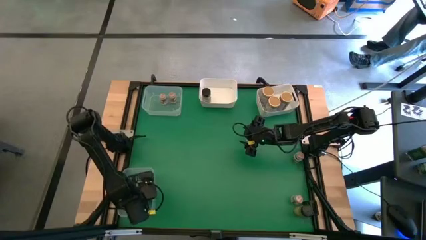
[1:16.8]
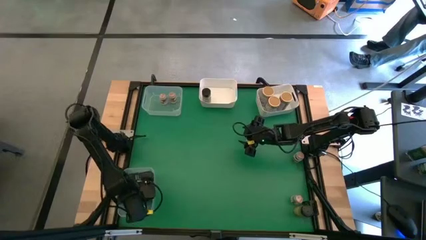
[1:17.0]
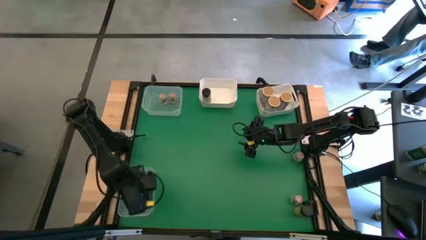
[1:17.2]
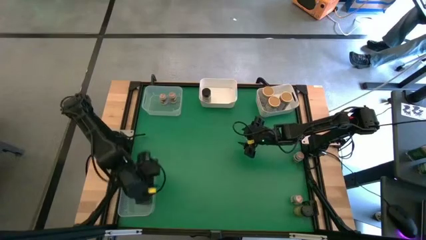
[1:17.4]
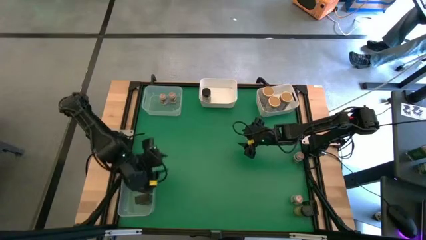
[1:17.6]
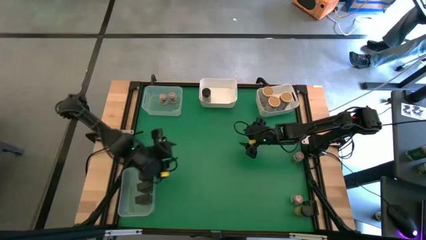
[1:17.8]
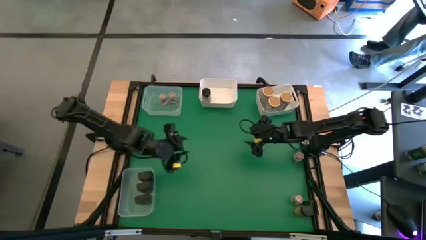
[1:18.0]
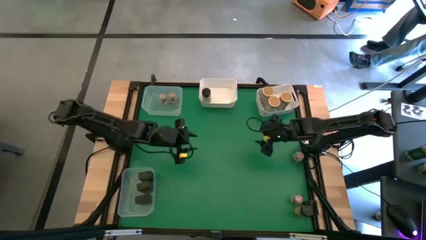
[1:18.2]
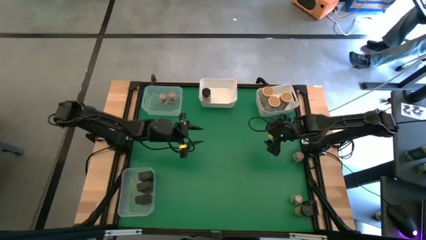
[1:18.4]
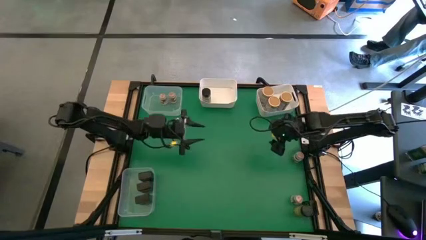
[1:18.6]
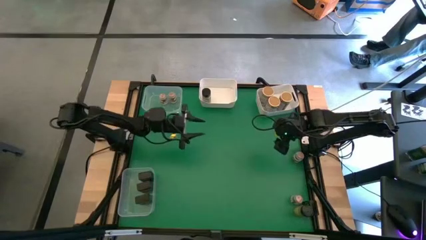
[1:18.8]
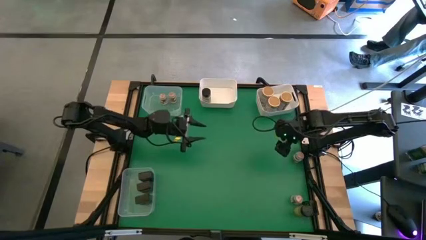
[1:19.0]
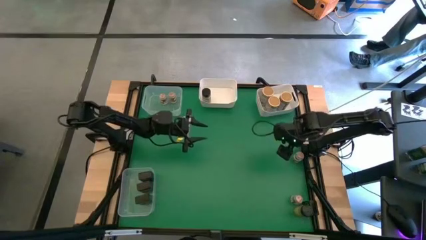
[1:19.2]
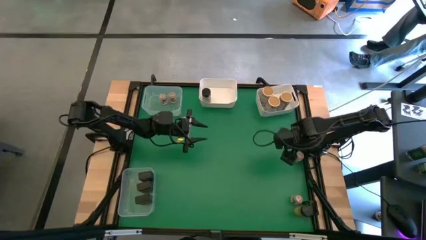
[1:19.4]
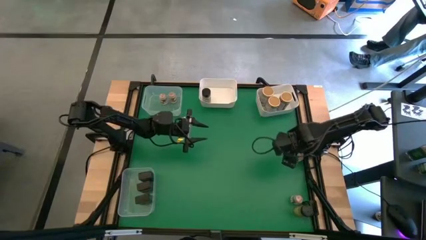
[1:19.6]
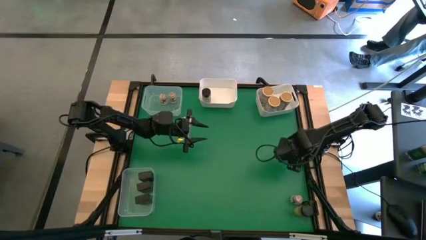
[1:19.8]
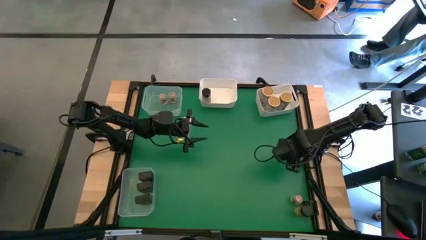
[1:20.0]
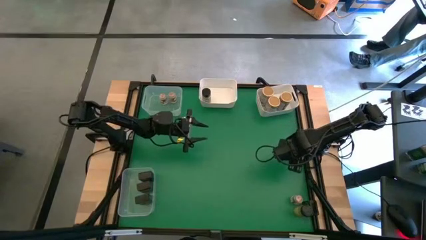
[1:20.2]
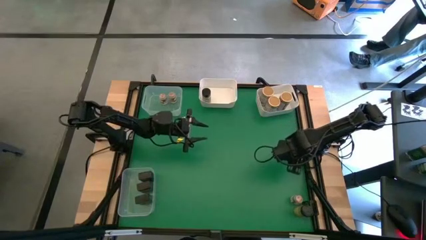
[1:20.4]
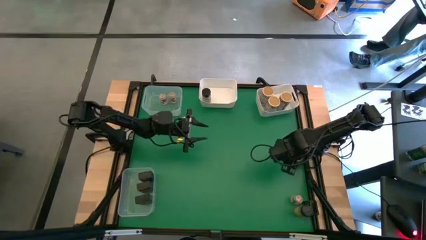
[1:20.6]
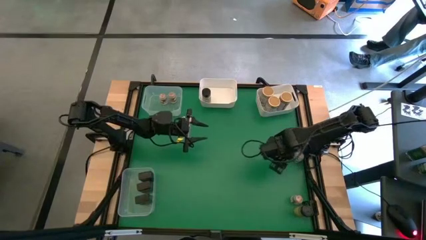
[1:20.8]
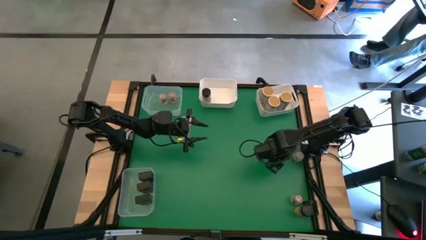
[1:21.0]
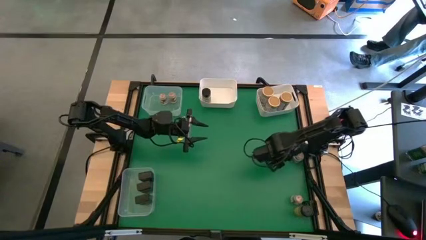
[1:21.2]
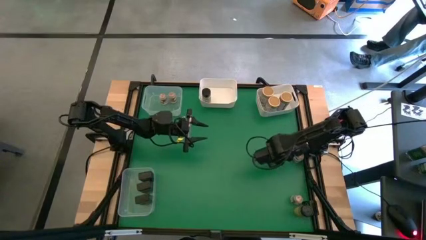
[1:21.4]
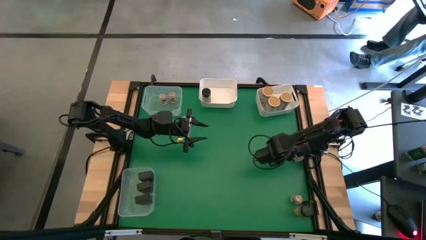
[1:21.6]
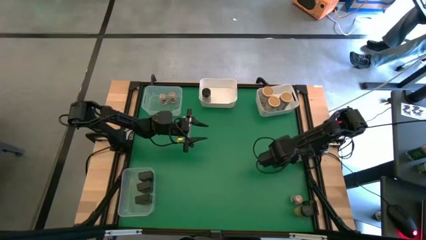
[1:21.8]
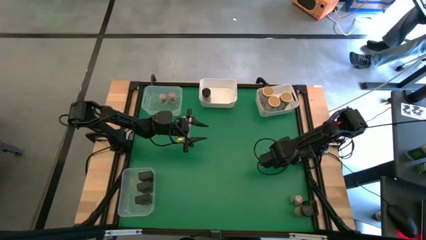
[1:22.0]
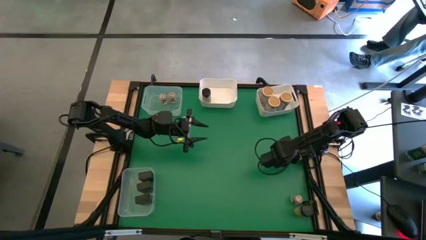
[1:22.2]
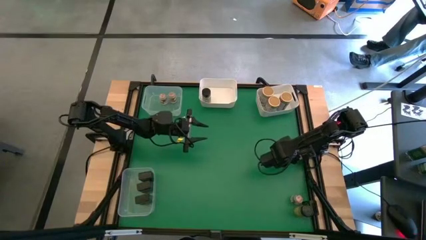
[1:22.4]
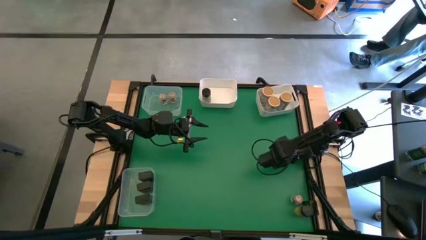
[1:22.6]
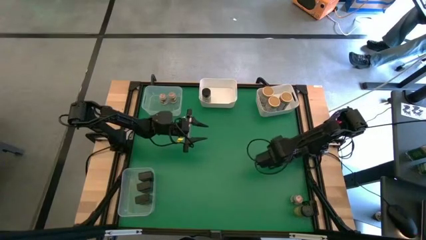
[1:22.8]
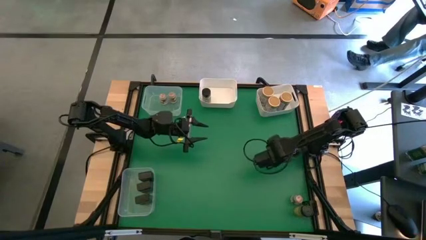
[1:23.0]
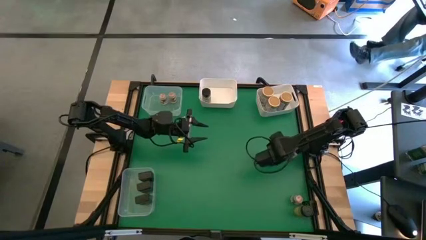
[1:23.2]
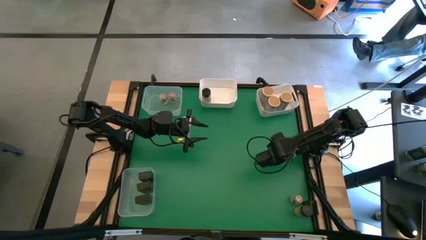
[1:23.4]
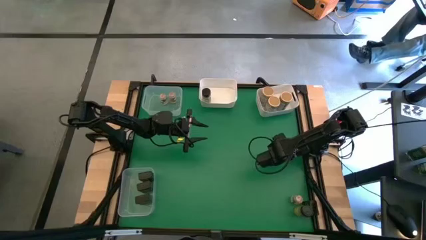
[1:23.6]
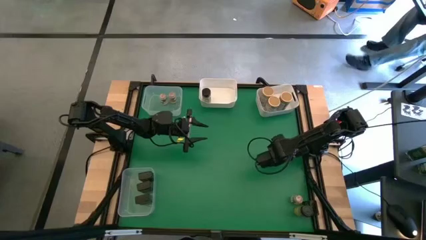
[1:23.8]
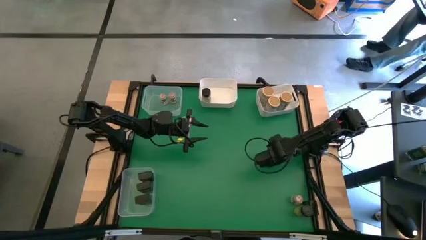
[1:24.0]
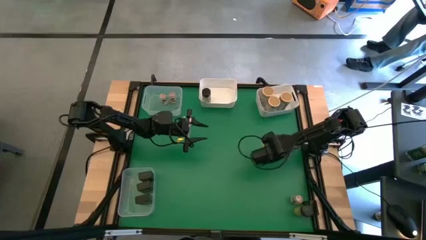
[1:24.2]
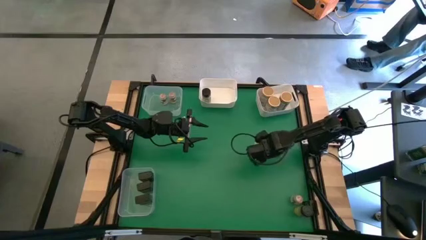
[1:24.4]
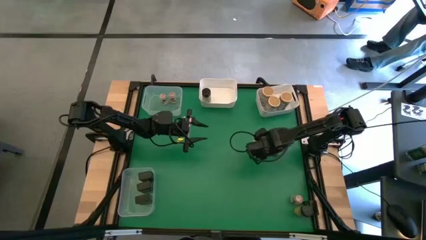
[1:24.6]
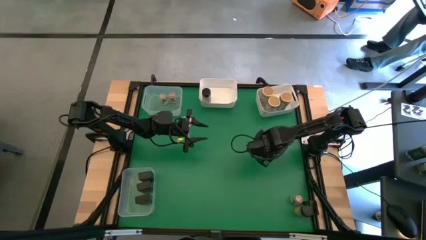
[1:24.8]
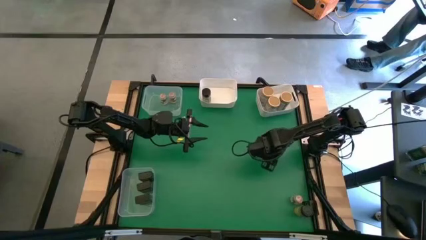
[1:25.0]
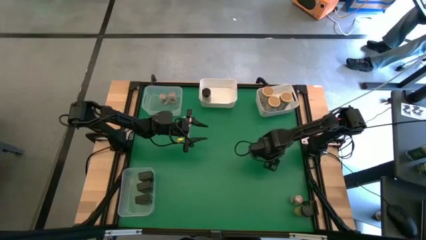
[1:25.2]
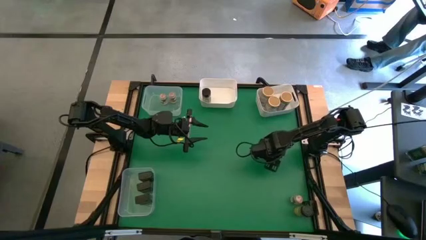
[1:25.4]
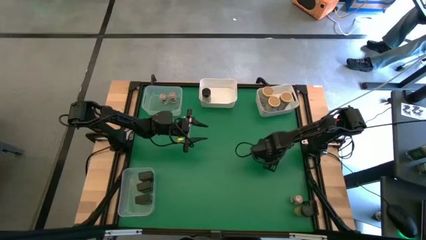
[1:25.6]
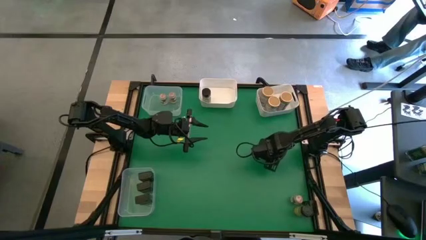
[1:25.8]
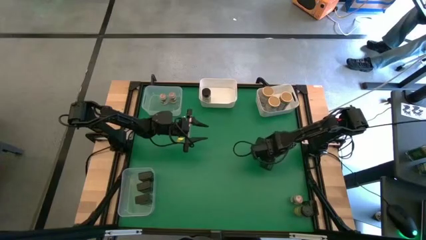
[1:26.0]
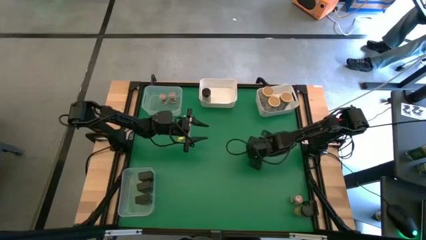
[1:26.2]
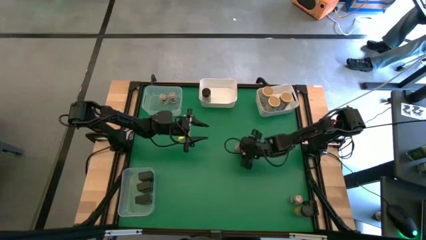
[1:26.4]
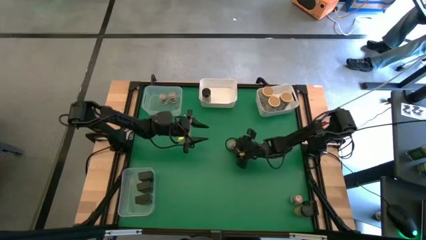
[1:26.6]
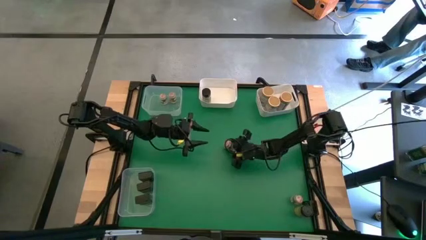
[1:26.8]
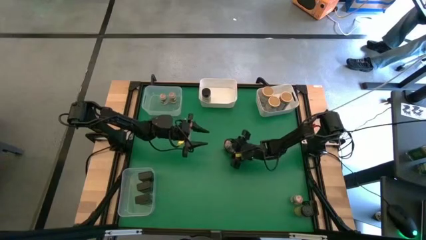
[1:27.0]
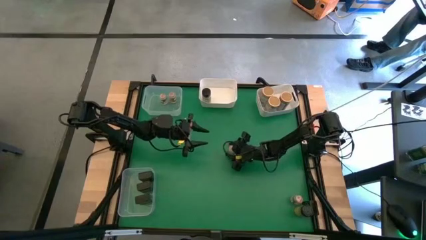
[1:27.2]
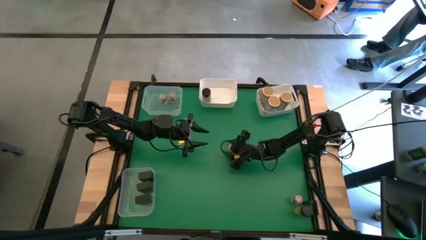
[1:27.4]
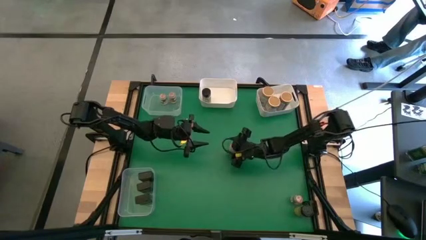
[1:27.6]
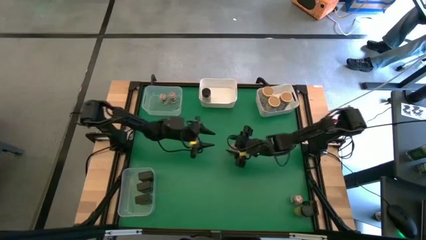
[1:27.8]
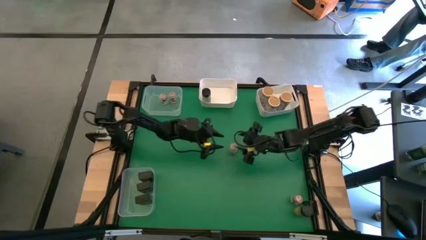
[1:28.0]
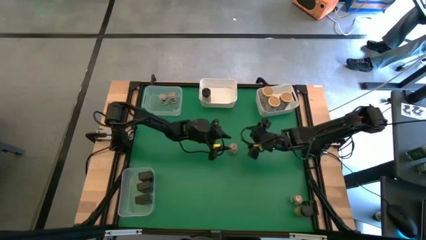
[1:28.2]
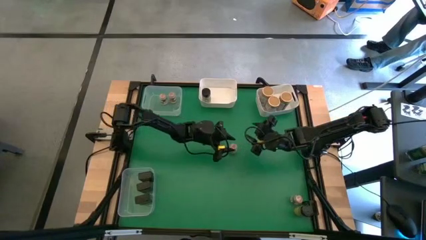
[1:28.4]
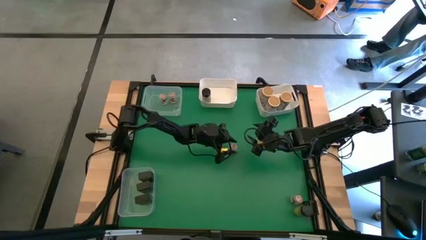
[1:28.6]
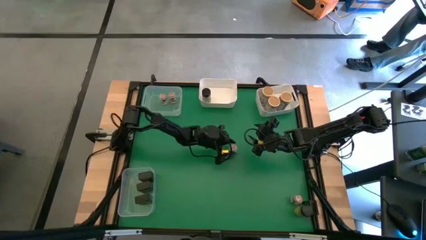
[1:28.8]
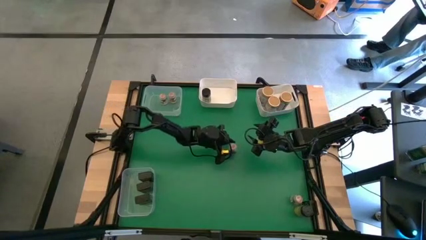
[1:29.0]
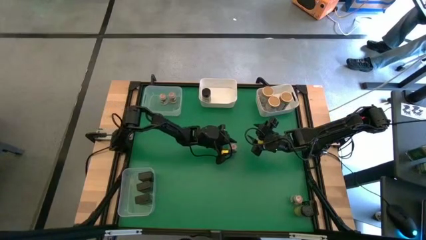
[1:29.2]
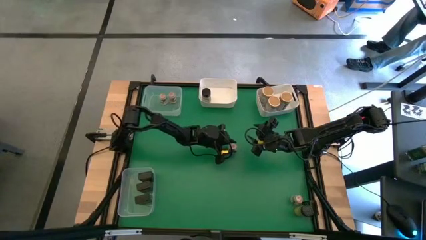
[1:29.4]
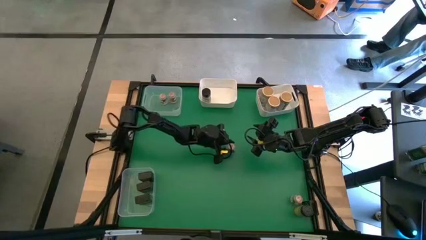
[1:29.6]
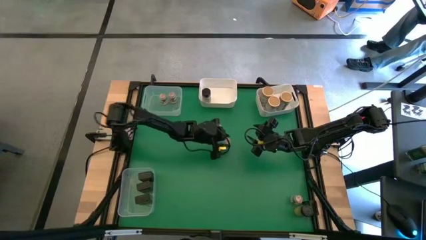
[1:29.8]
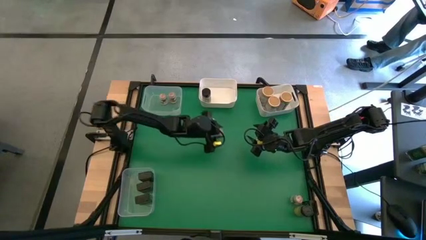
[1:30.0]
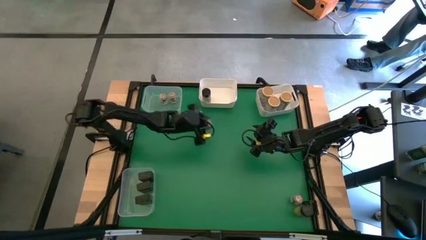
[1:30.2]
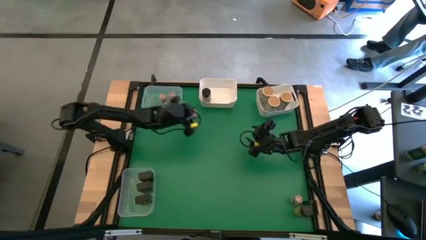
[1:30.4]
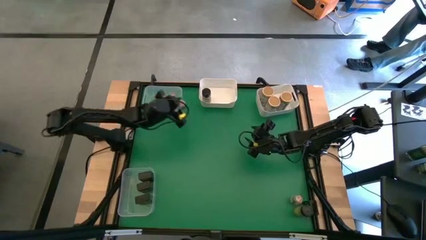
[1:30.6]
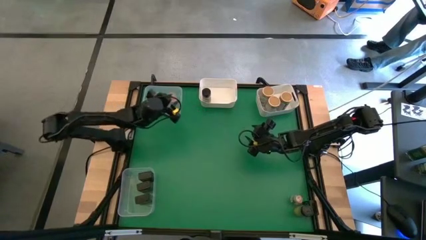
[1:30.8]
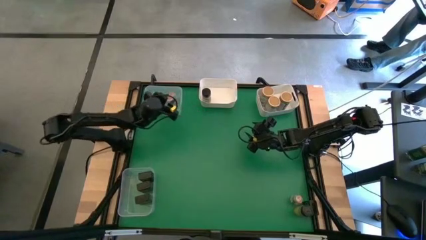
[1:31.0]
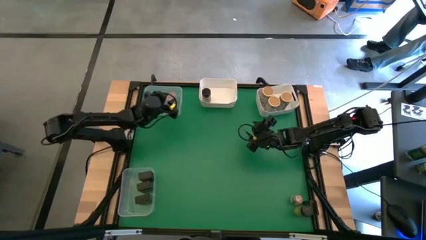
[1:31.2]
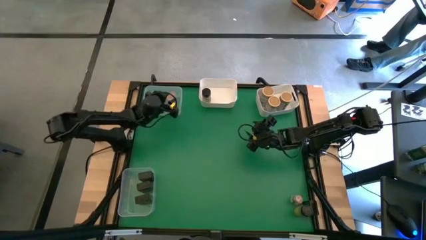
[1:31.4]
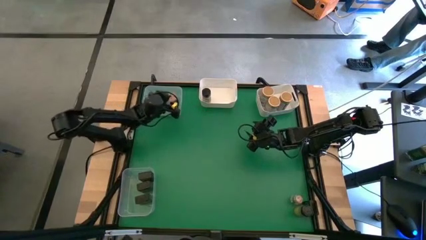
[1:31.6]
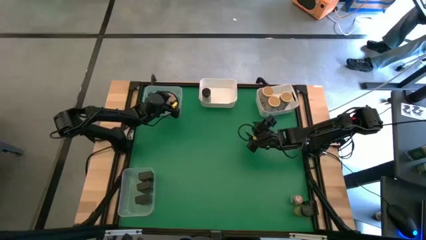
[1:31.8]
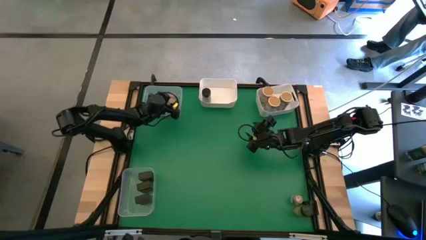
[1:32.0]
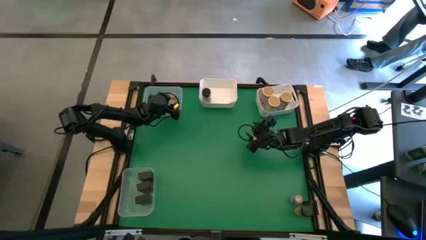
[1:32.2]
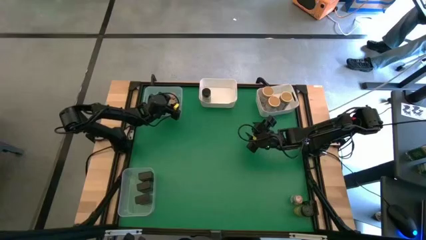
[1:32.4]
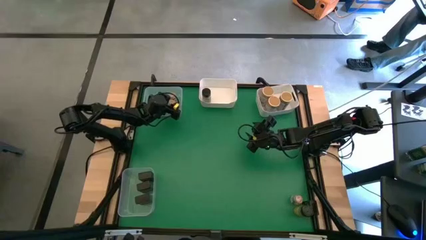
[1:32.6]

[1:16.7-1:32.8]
Task: Sort spices by type
Put the top small brown seasoning bottle into the top transparent bin
